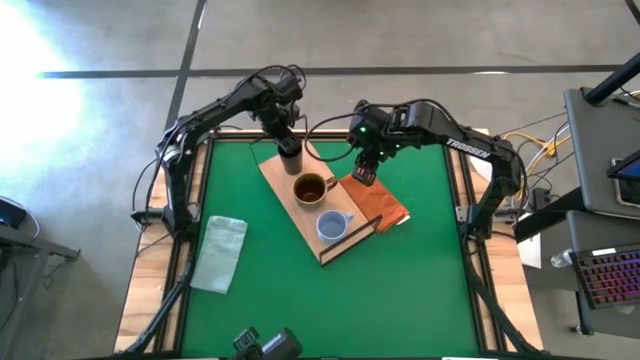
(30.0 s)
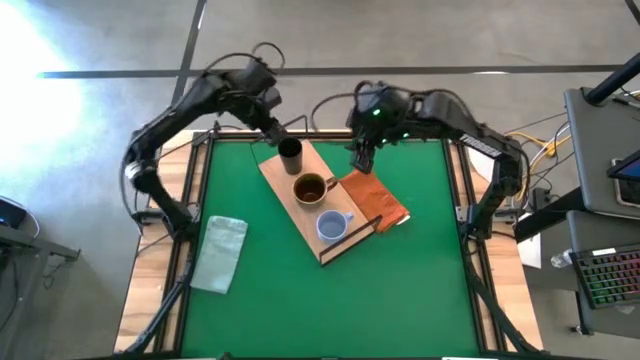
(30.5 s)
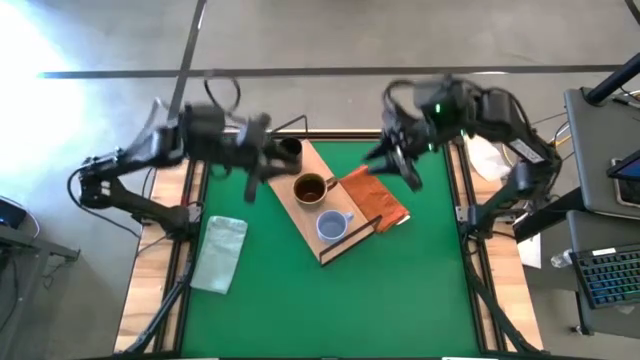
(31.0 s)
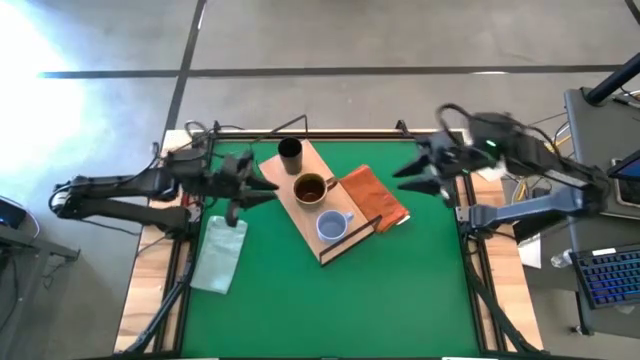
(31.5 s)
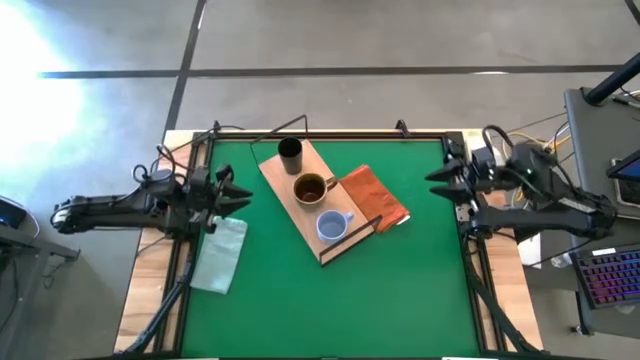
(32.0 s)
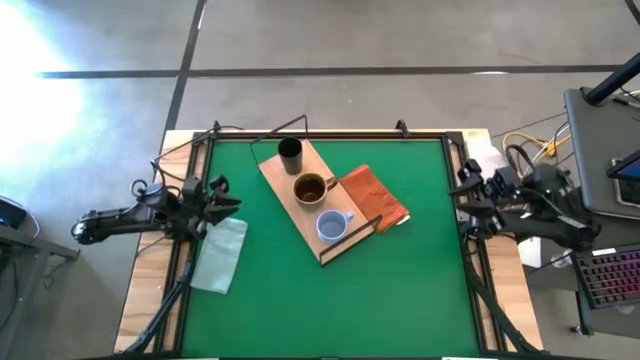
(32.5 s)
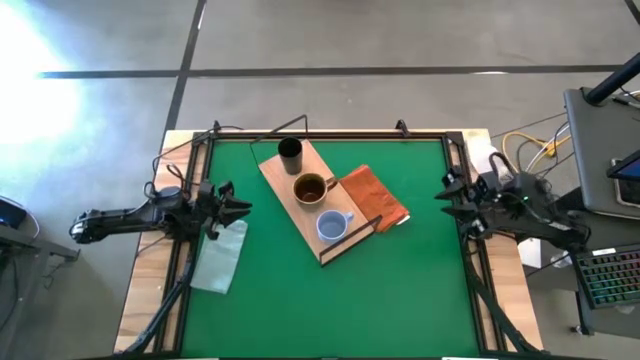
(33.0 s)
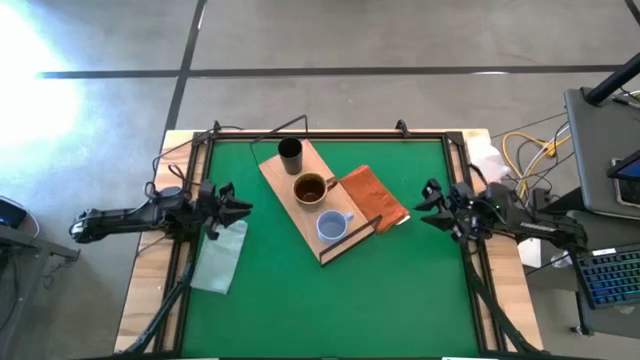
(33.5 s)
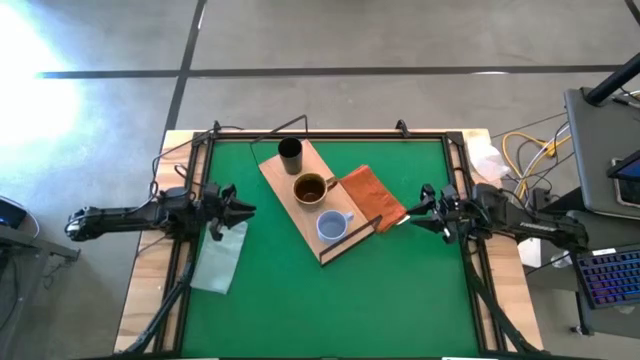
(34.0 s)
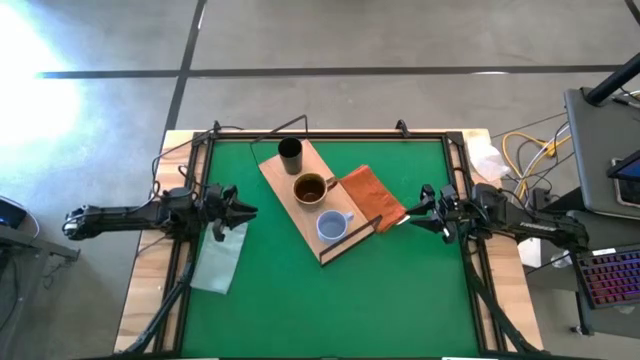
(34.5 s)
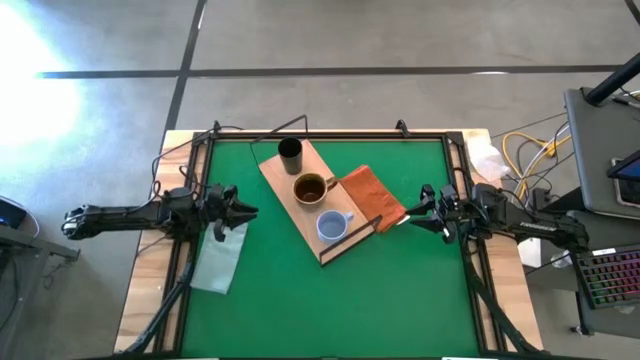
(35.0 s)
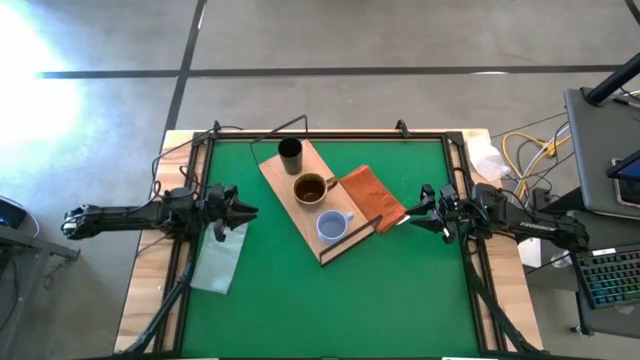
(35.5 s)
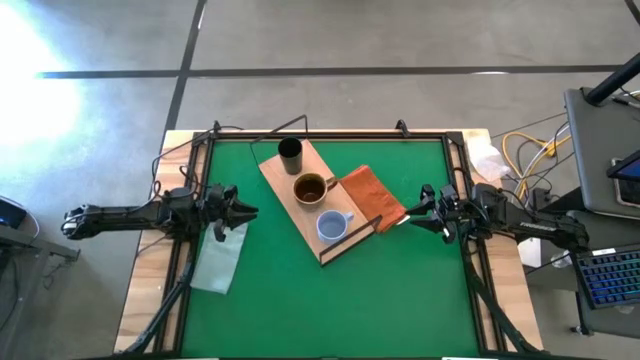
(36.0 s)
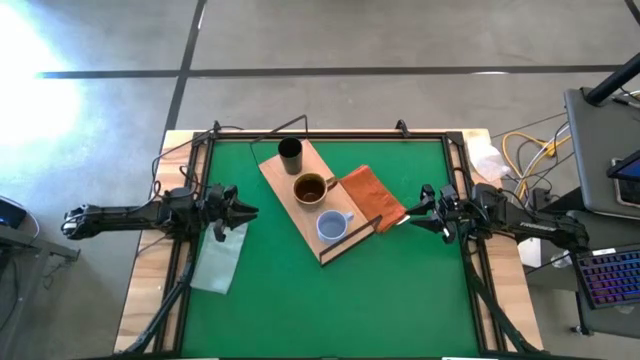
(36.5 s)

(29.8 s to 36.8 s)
Task: Stack small to large cups/mugs on shelf
Return to Home Position

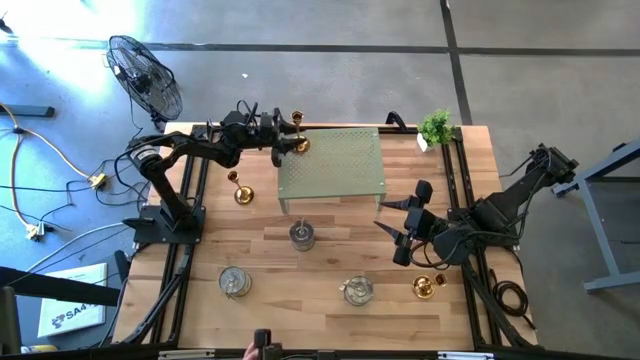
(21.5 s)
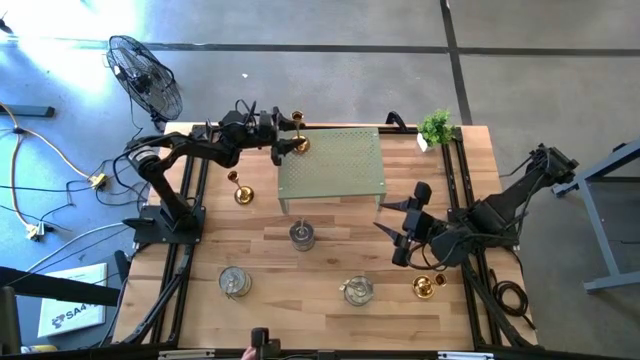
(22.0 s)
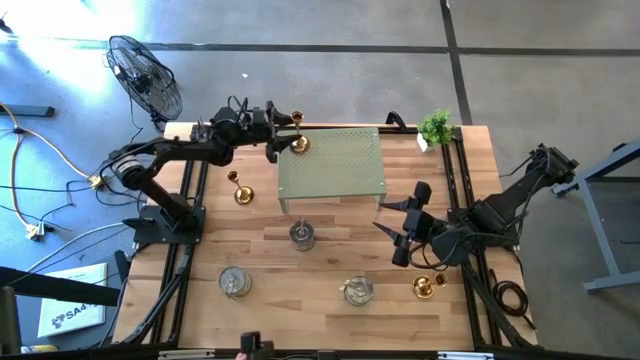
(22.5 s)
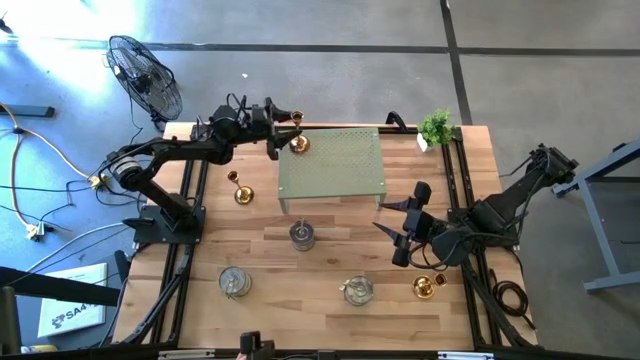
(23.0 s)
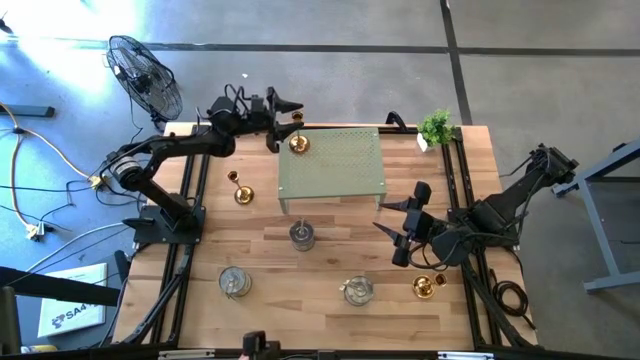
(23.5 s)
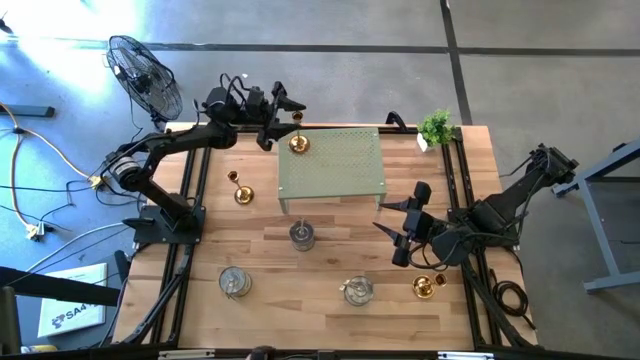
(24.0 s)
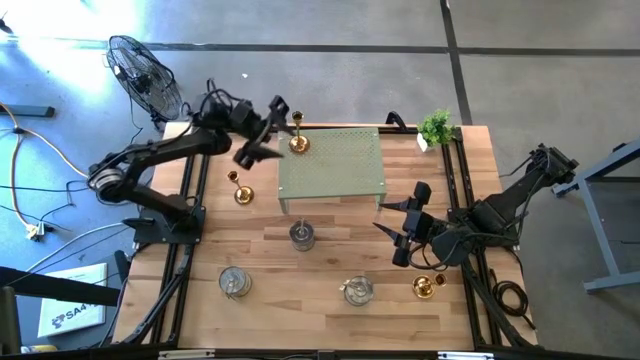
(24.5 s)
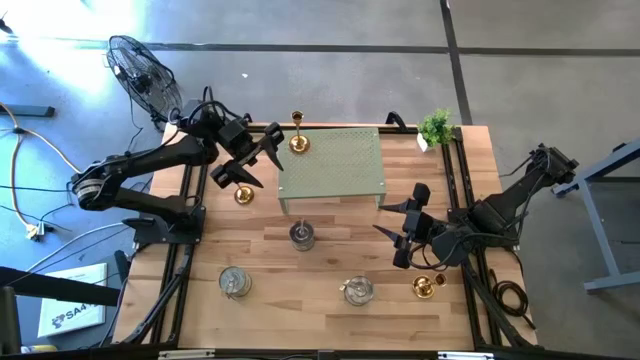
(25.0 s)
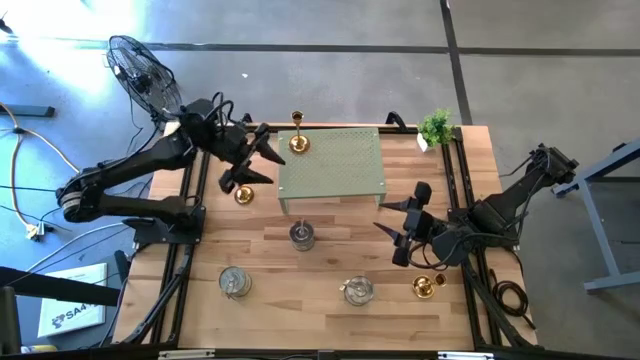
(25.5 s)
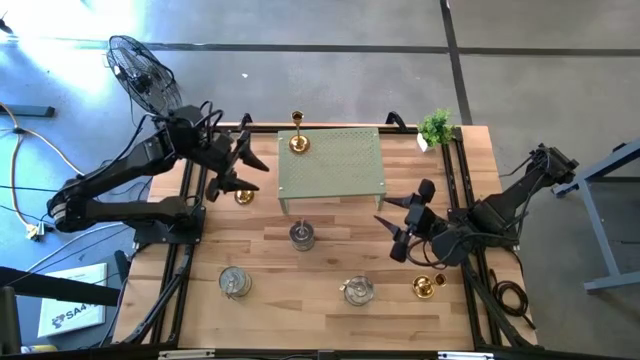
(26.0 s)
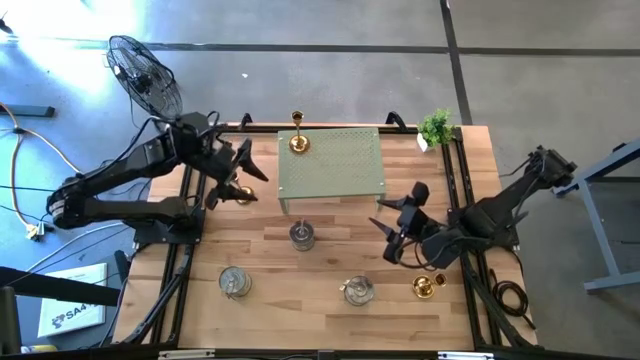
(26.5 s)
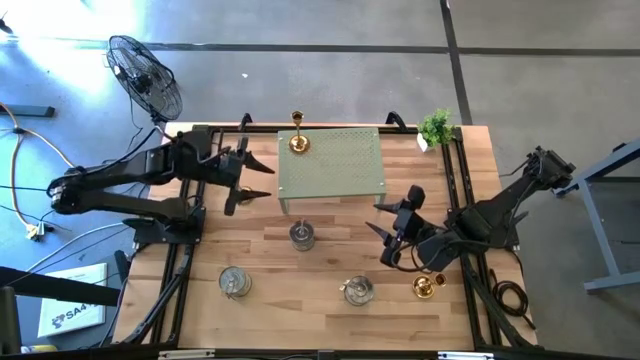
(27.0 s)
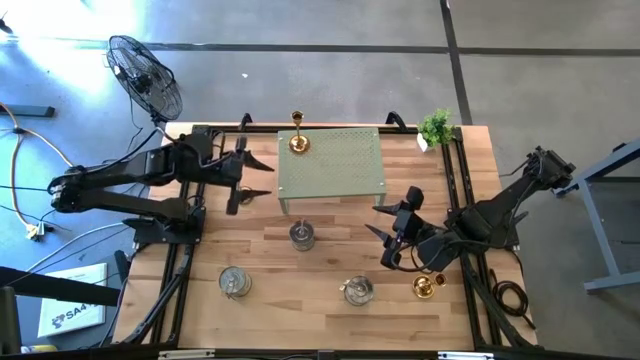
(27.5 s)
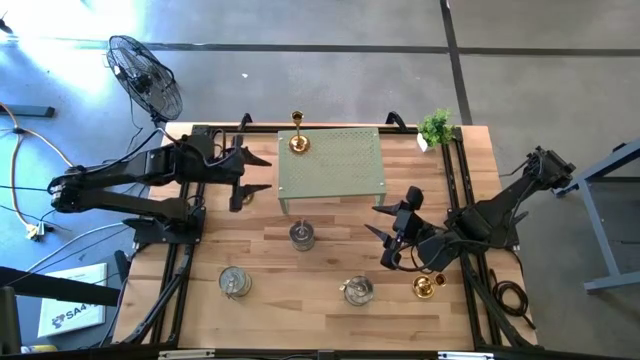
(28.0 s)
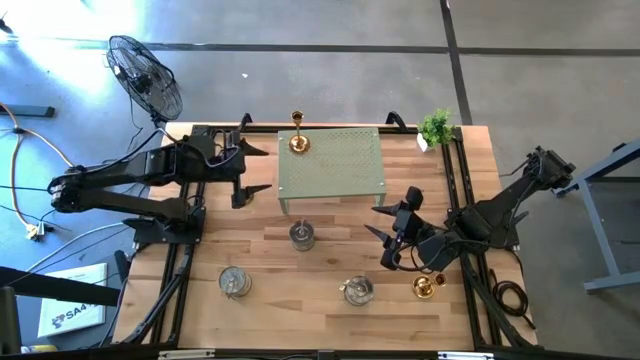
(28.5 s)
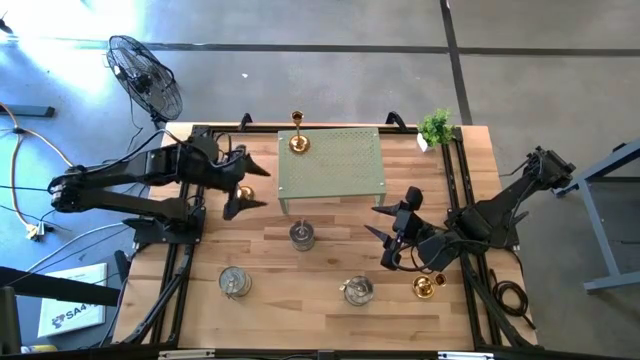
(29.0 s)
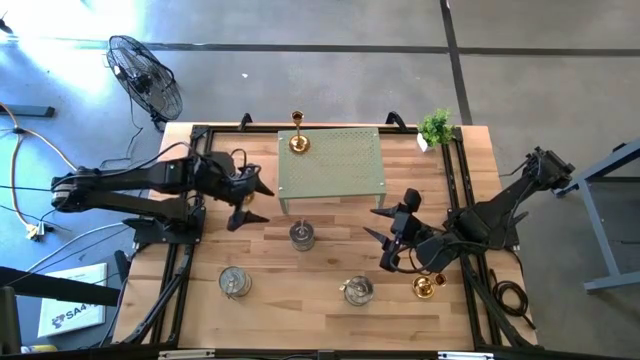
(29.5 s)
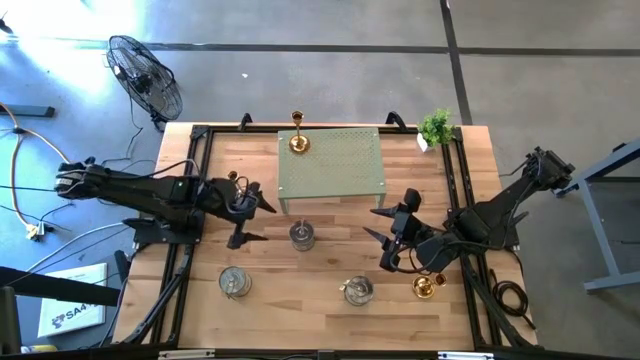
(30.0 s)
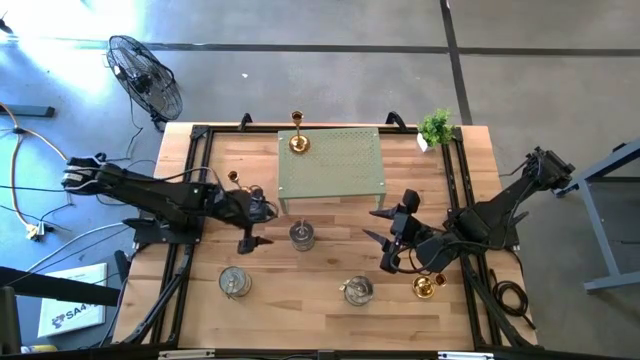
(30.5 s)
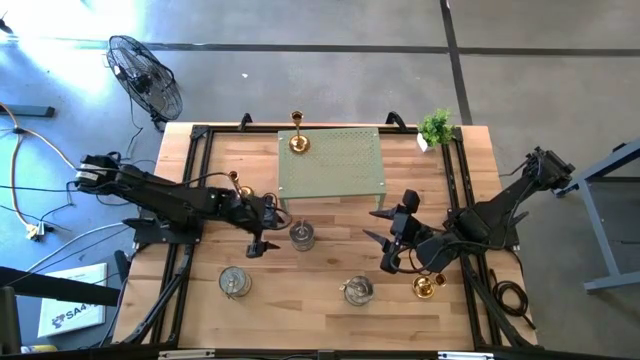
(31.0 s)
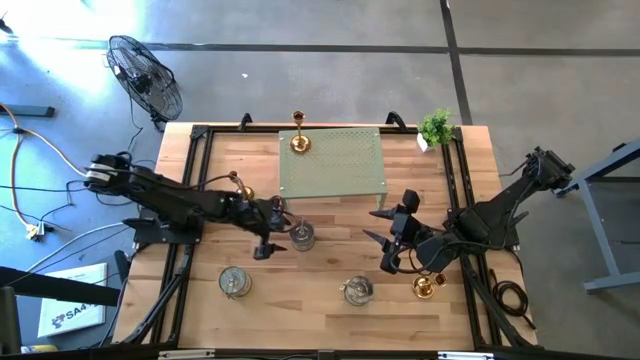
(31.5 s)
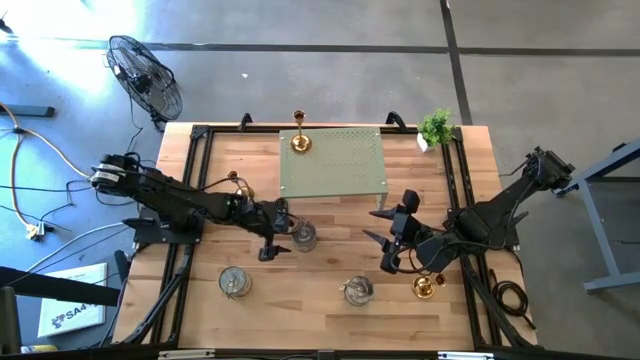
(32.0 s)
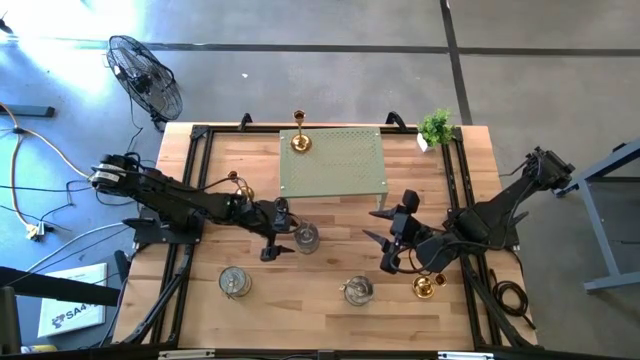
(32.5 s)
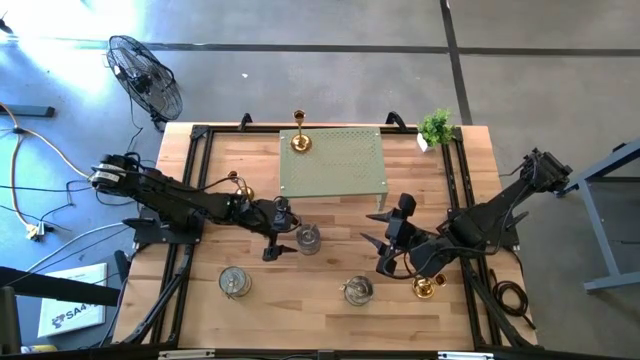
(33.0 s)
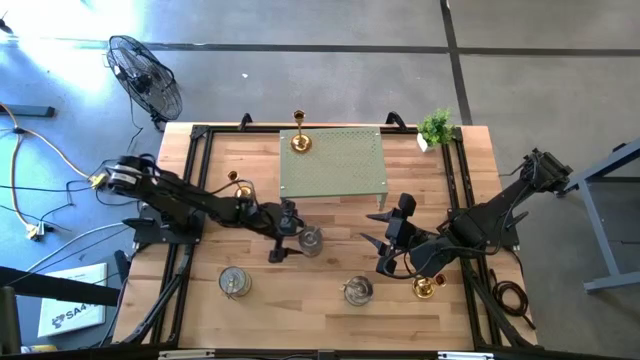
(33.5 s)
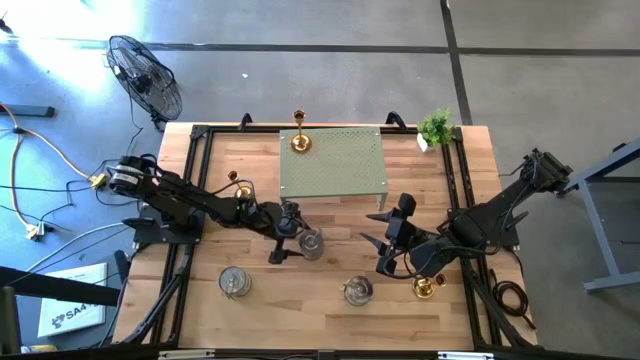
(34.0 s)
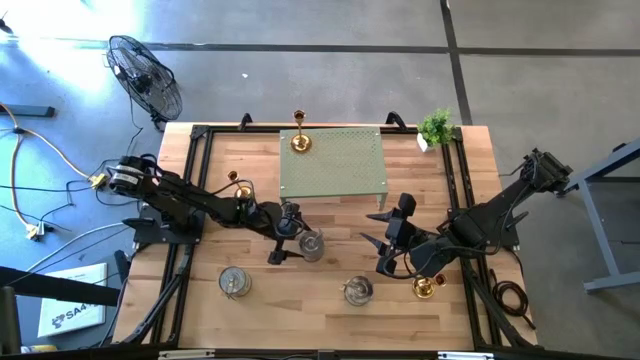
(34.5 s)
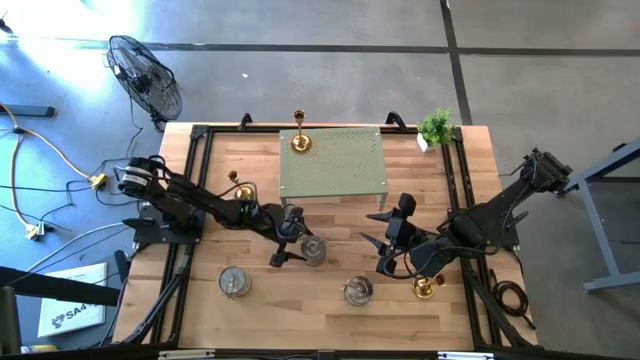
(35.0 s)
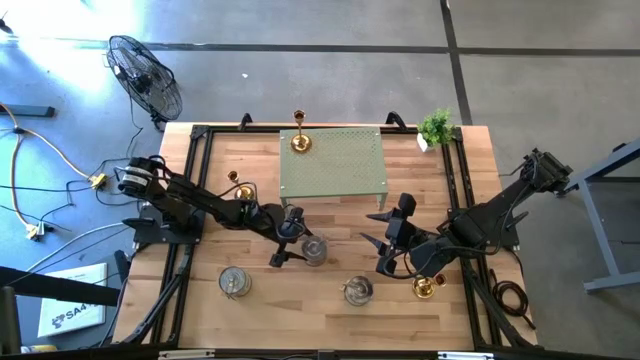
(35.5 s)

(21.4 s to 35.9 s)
Task: Pick & Place candle stick holders
Put the top silver scented candle on the shelf
